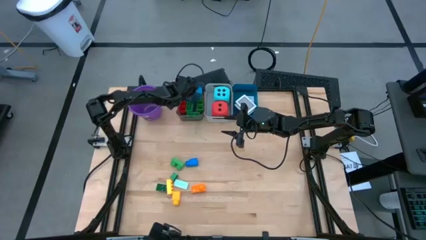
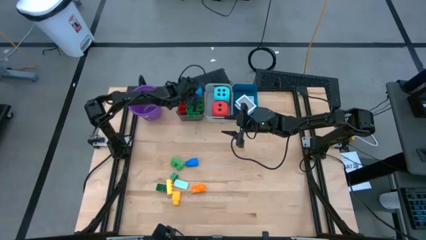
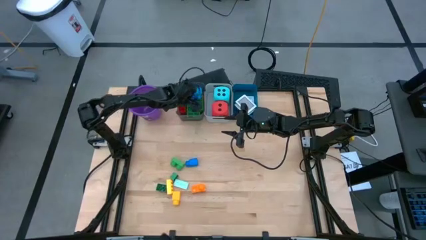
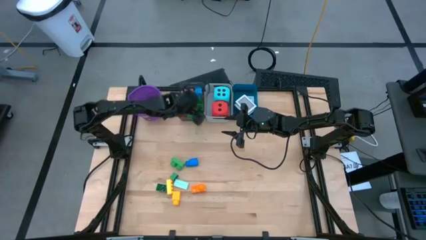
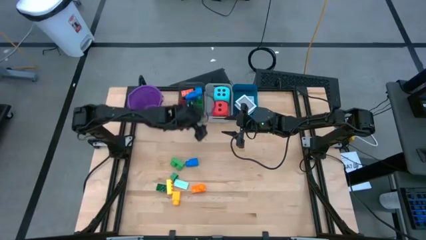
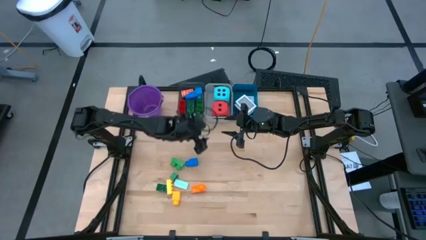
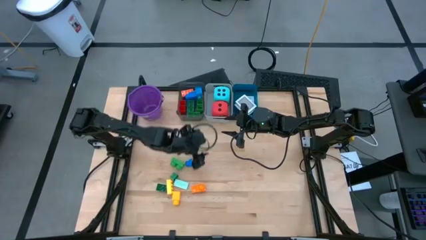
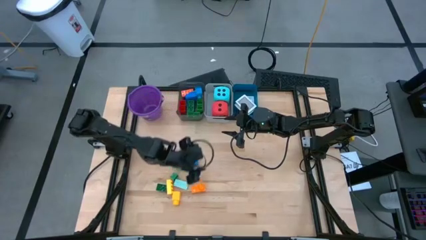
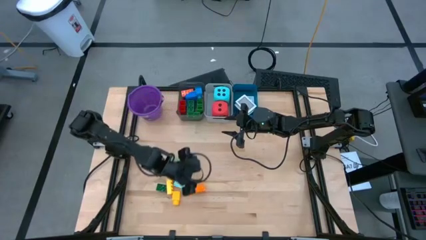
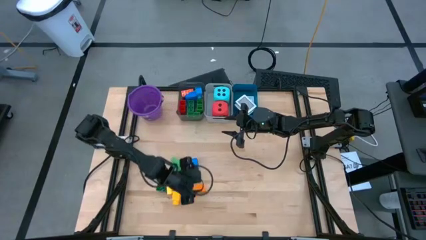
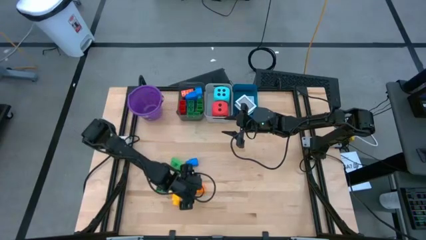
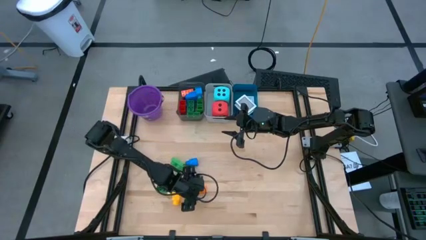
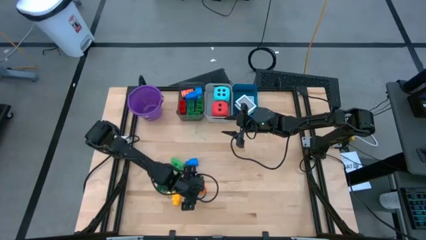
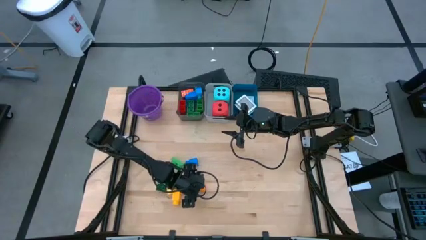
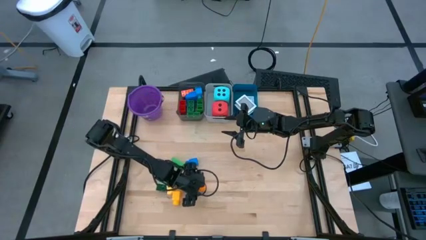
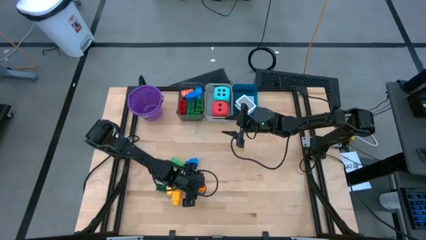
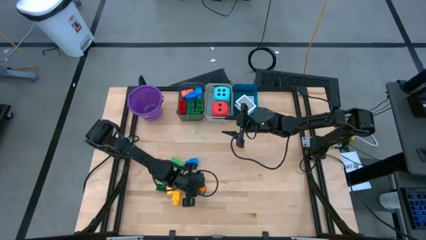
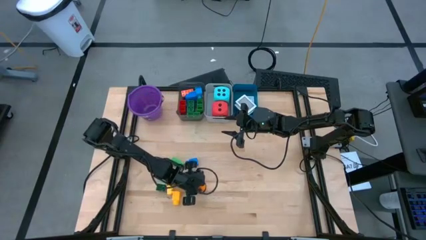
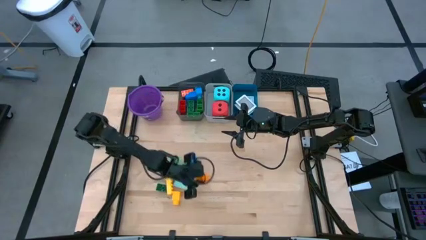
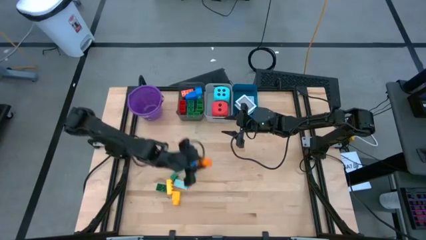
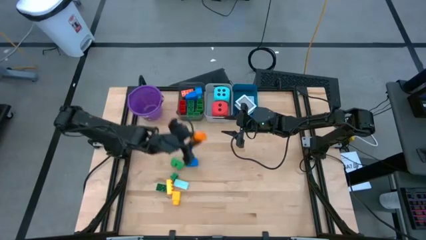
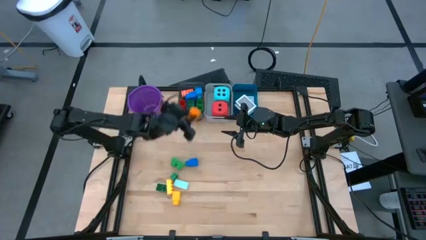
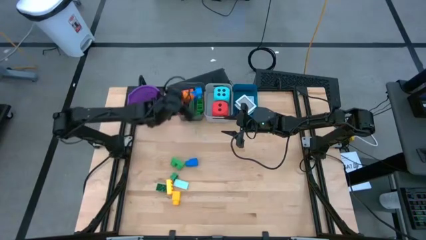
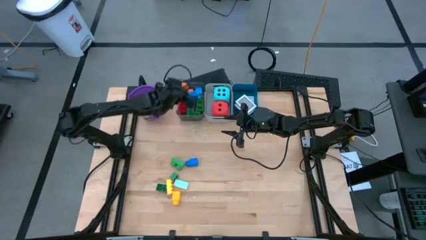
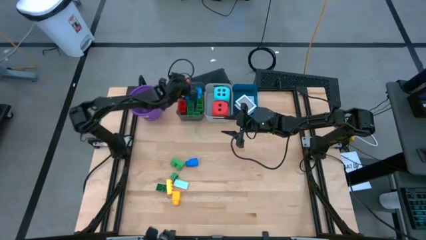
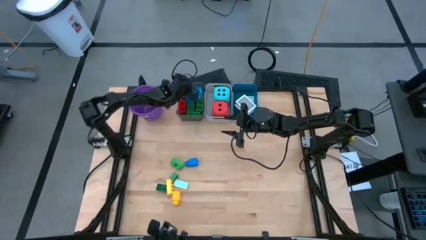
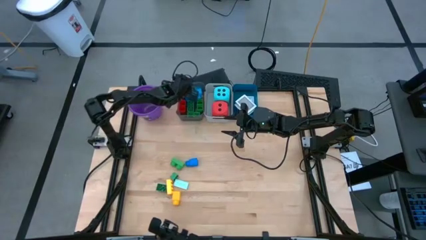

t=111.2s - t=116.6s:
Task: Pick & Place Toys
Put the orange game piece into the black bin

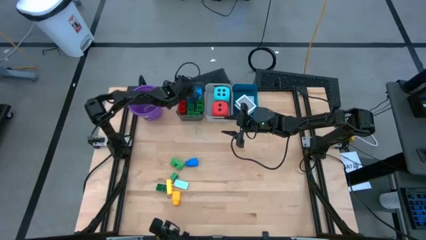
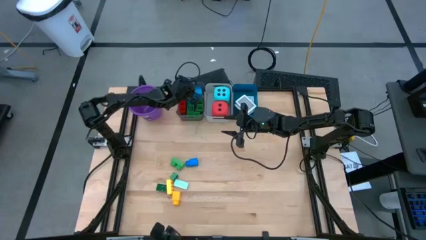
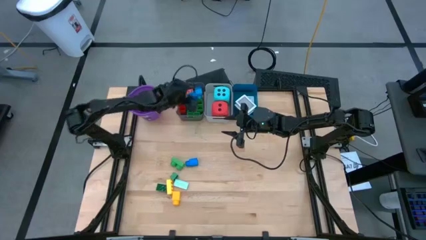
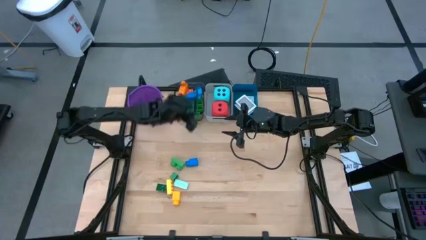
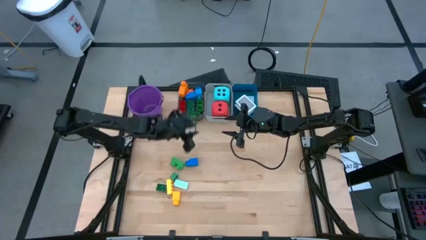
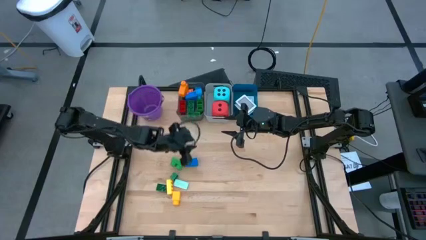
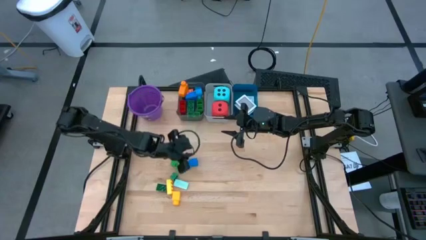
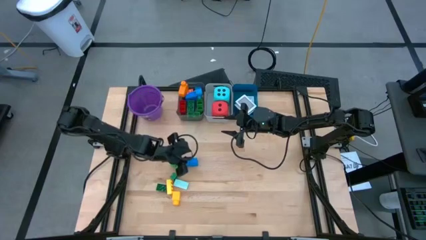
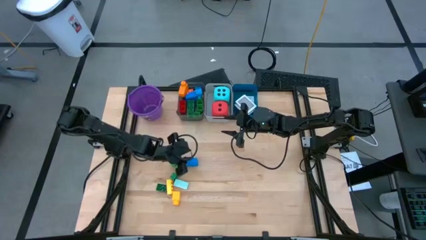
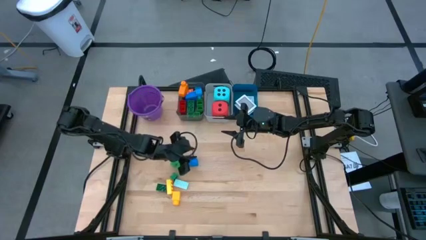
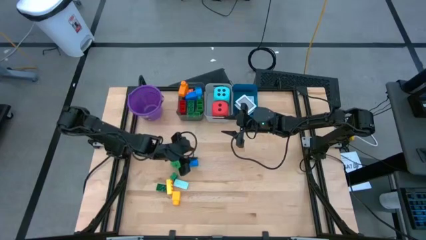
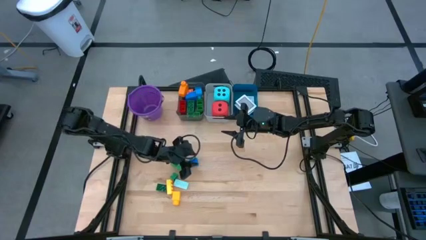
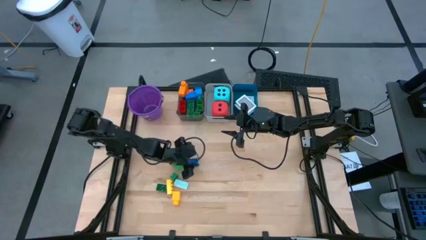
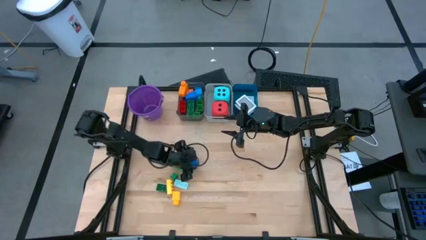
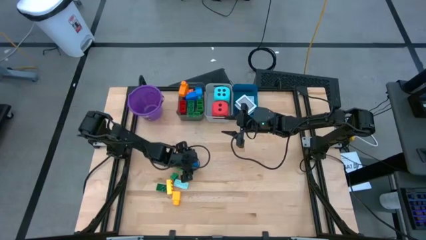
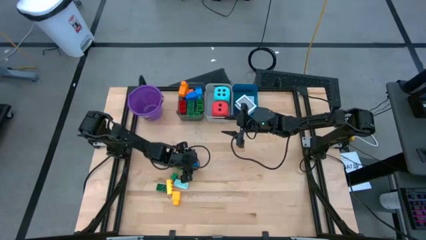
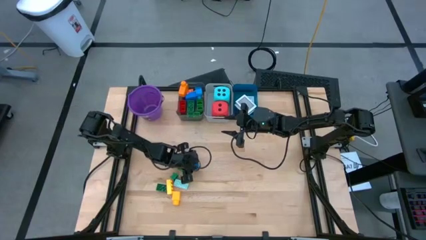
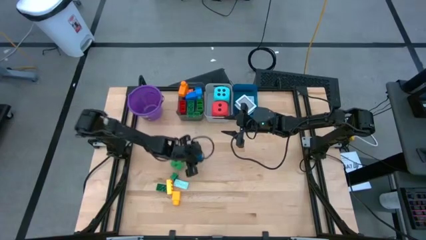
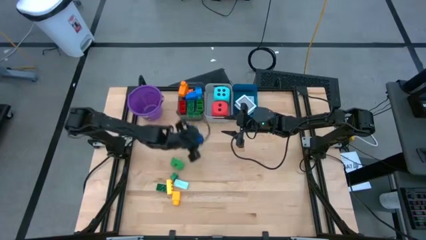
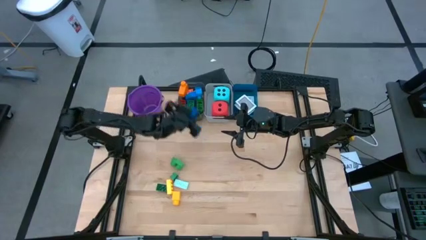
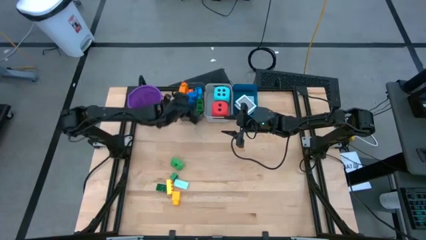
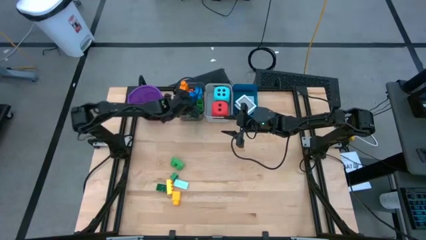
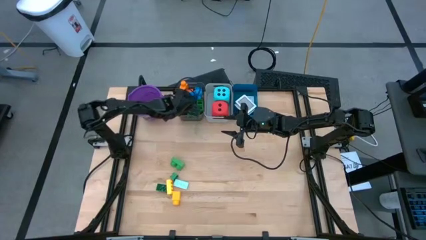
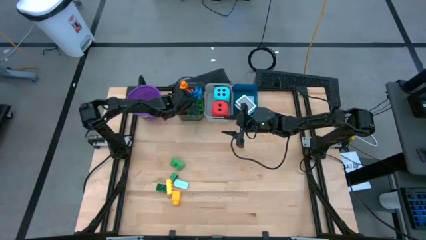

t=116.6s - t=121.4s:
Put the blue game piece into the black bin

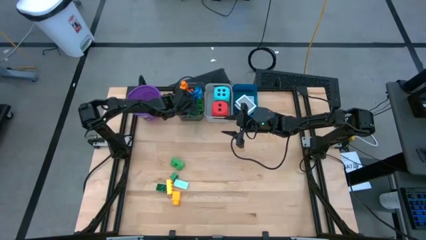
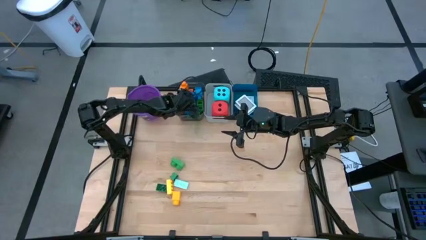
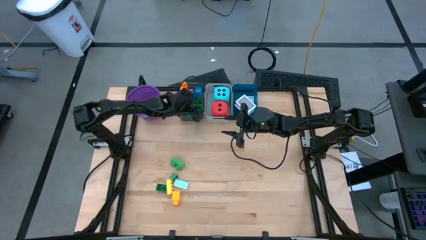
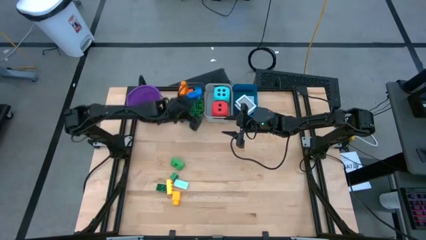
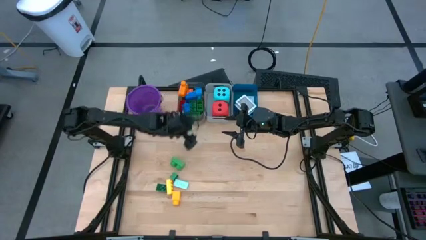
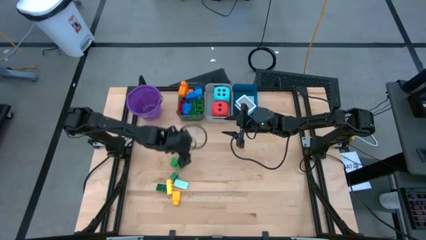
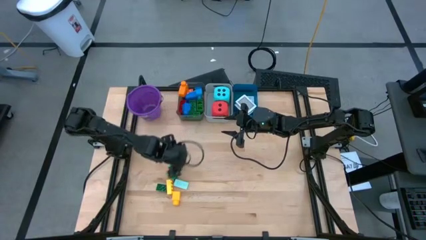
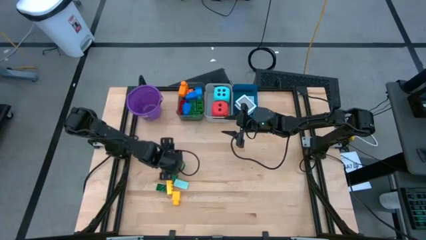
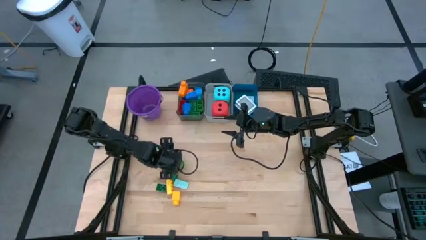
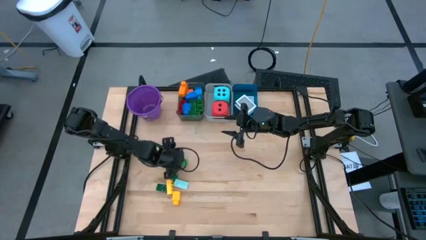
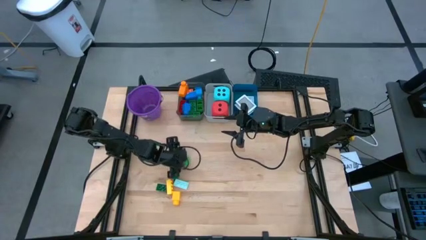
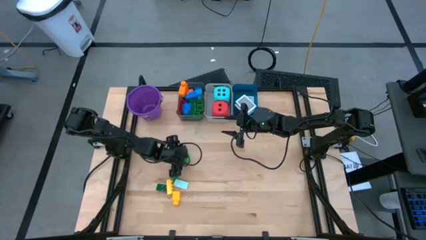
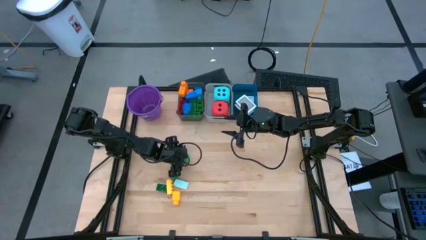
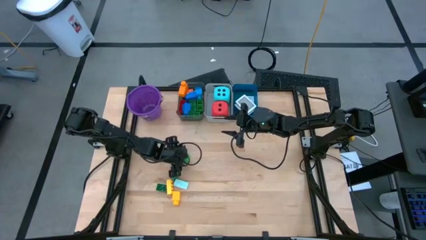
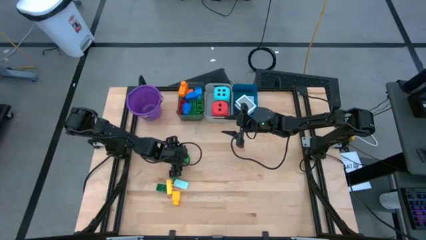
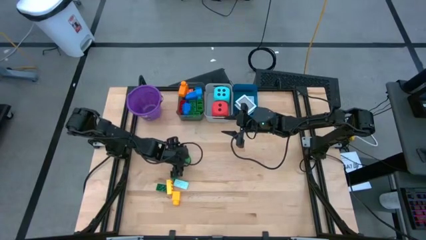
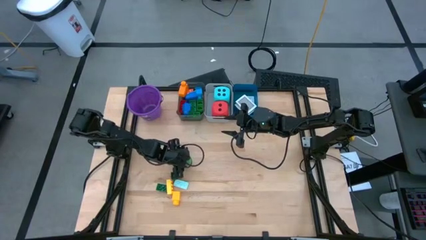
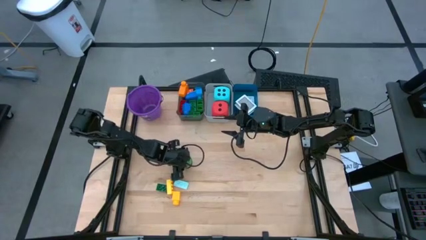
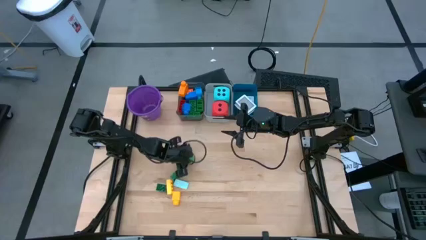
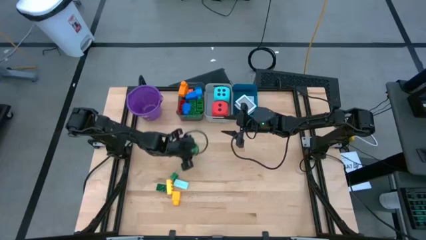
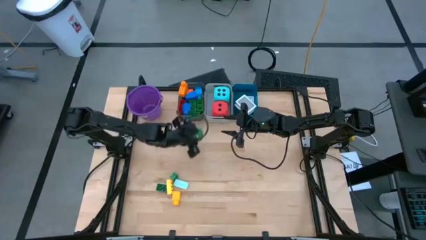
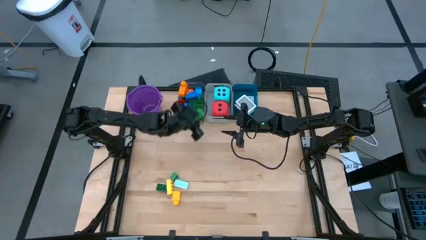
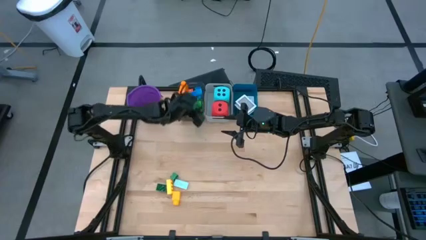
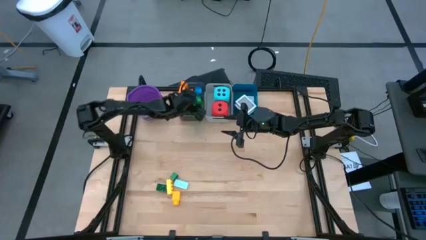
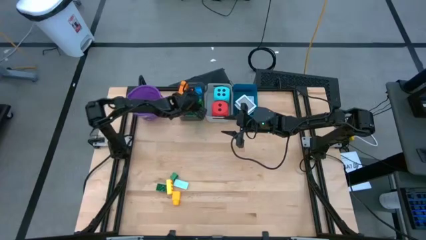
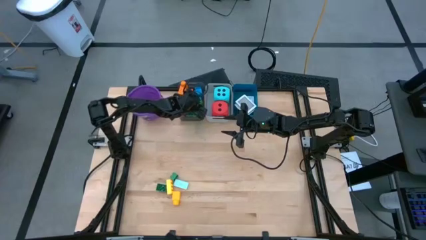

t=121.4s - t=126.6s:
Put the green game piece into the black bin
